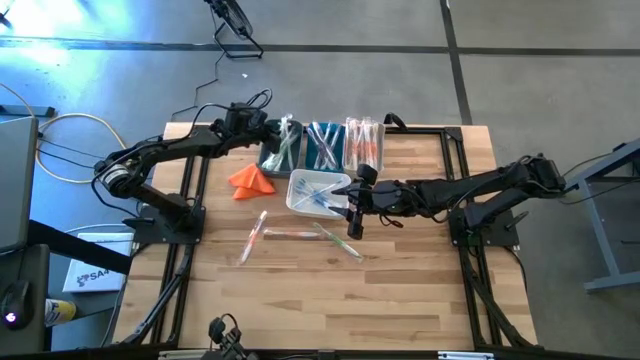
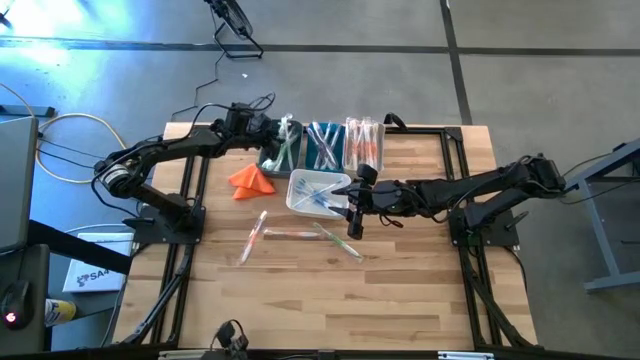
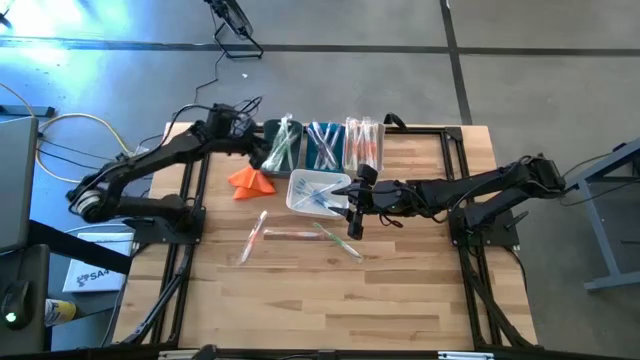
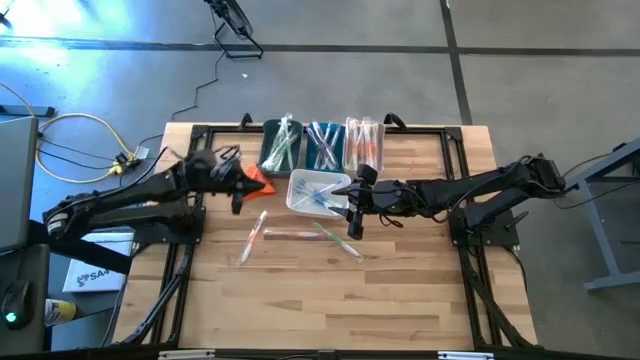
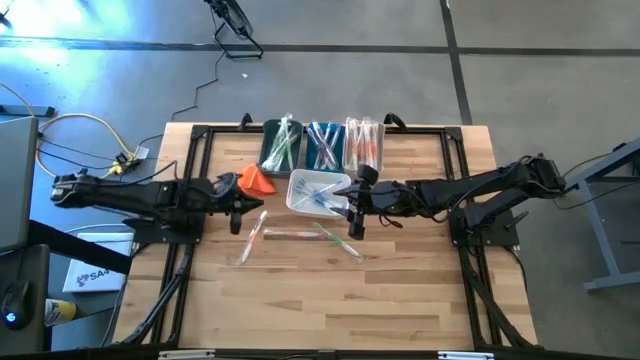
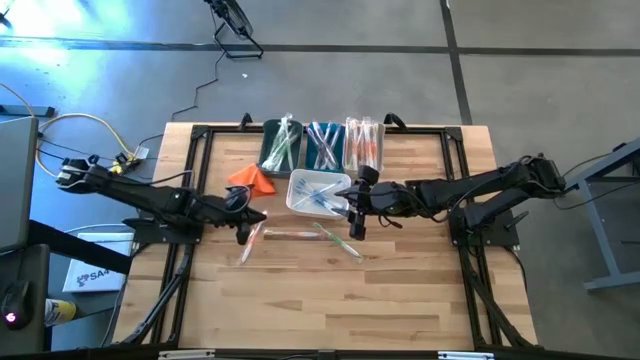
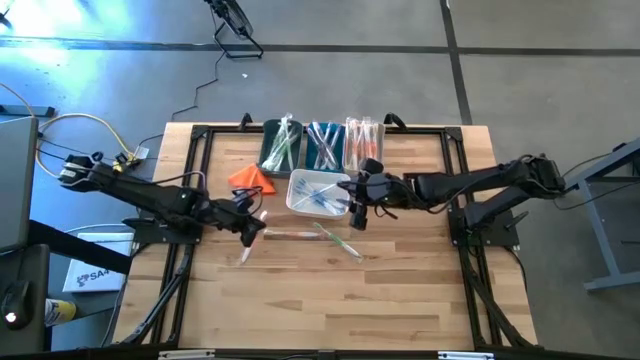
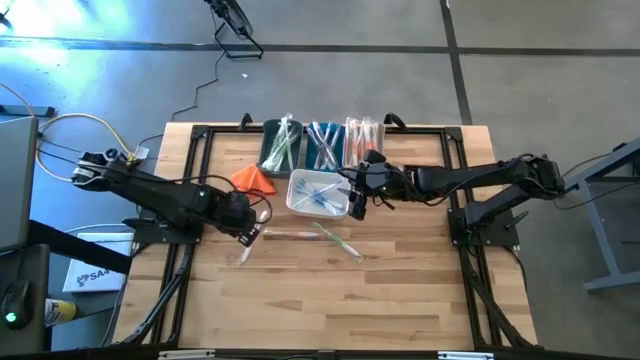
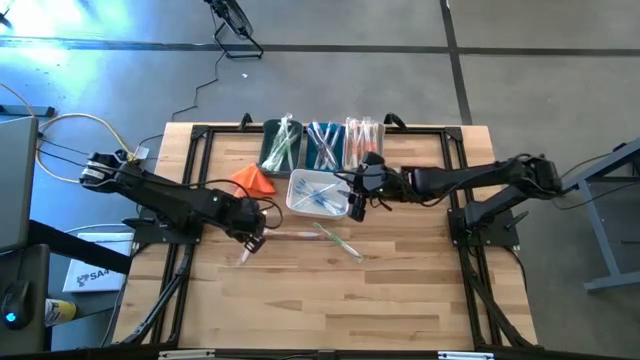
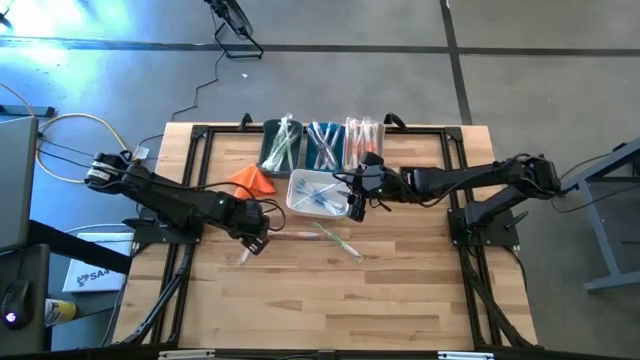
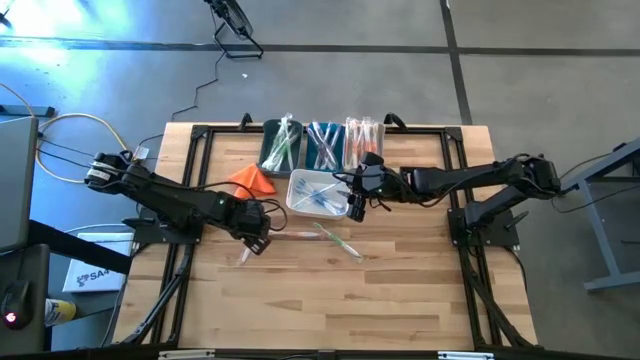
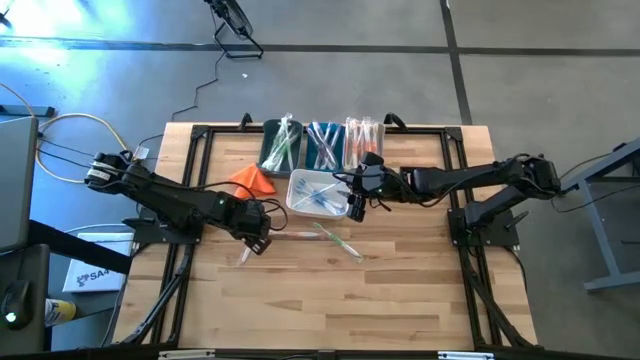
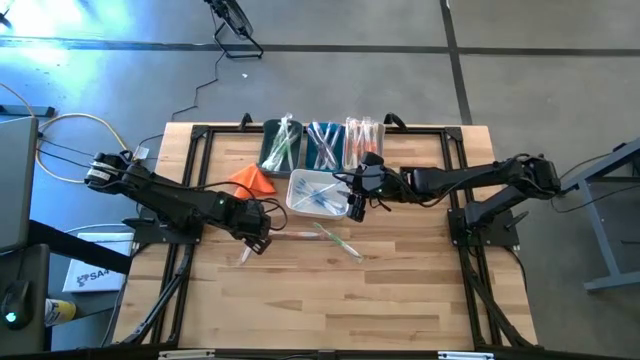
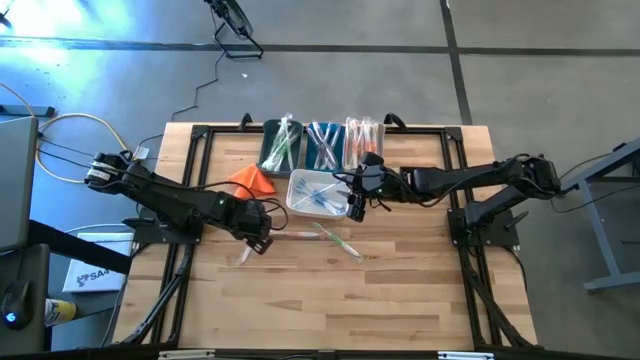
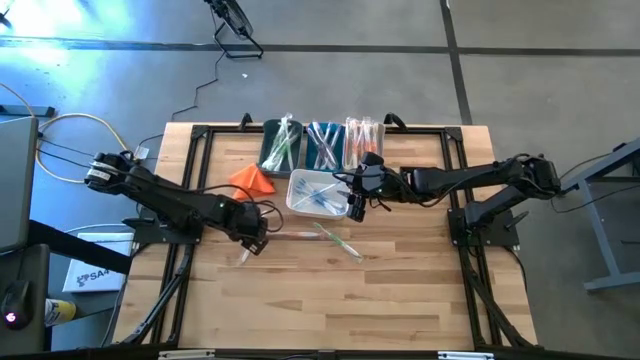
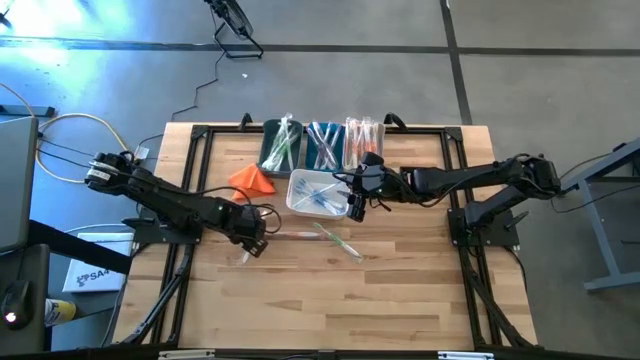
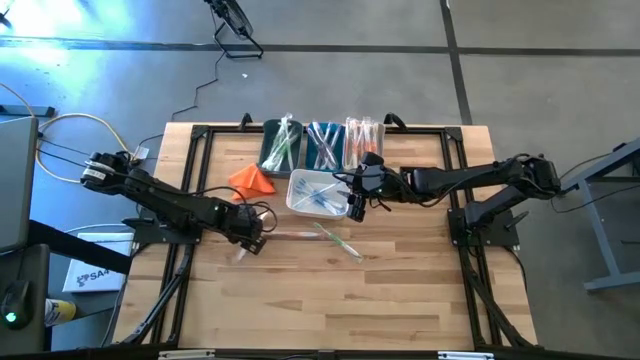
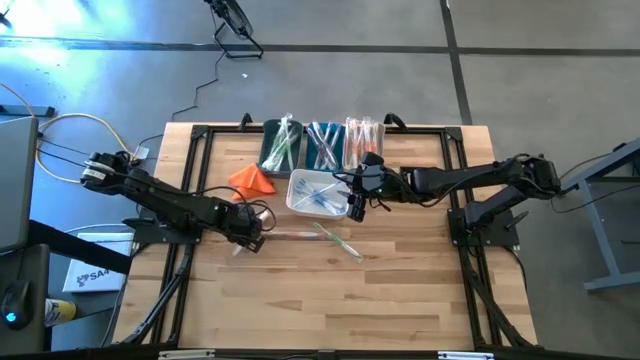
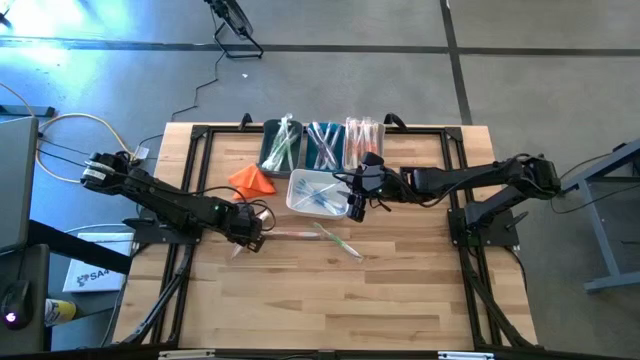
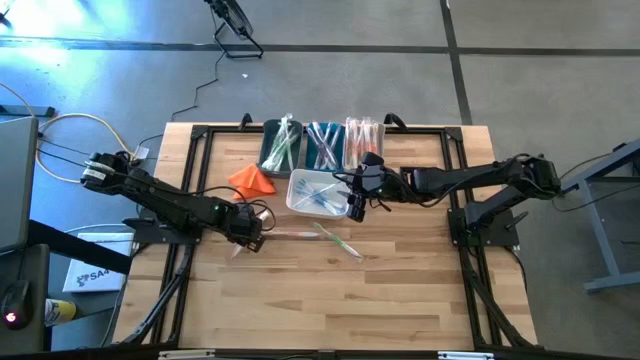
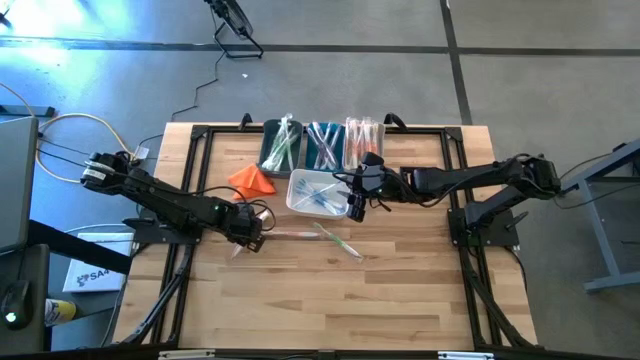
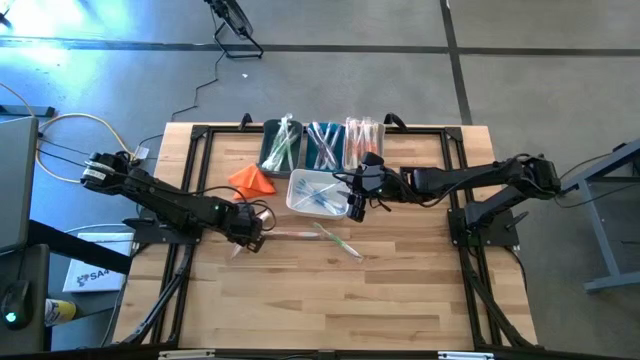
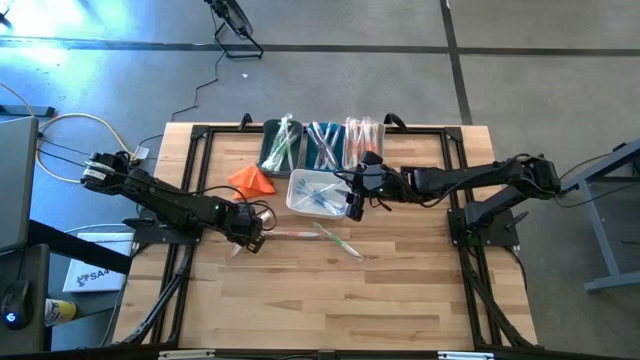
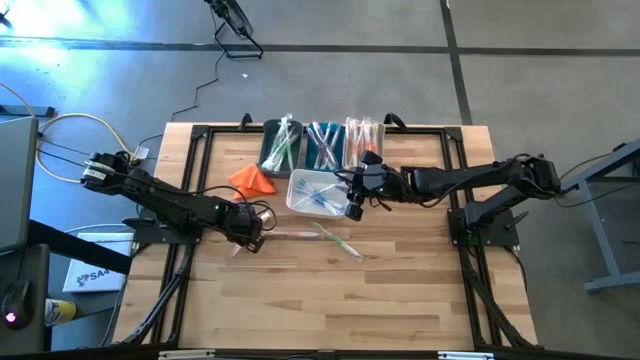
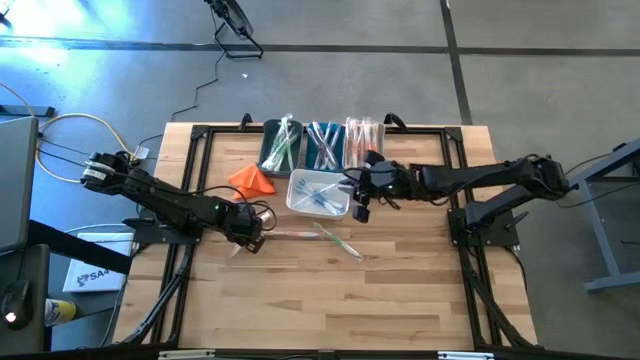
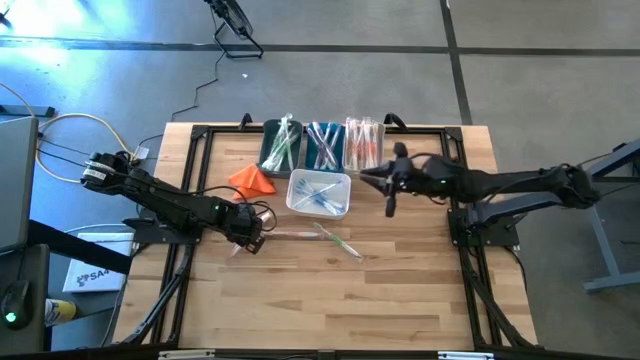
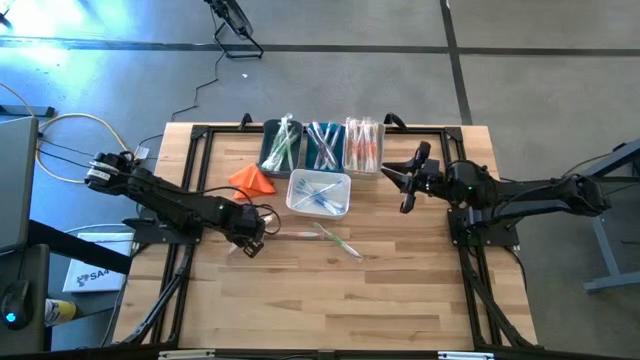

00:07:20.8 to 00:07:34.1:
Task: Pick & Place Toothbrushes
Put the orange toothbrush into the gray bin

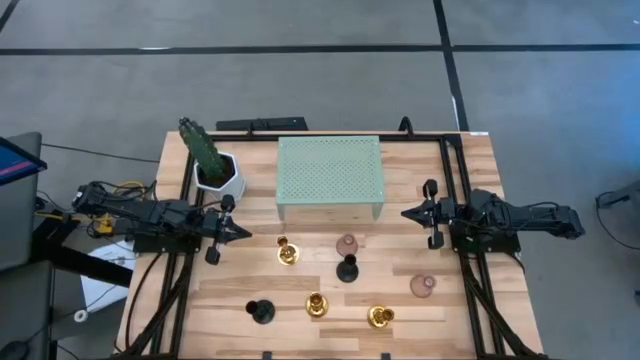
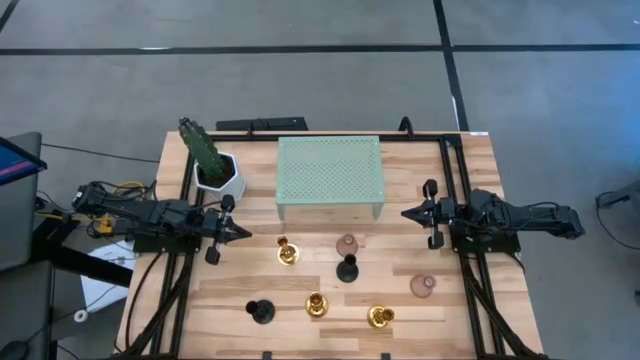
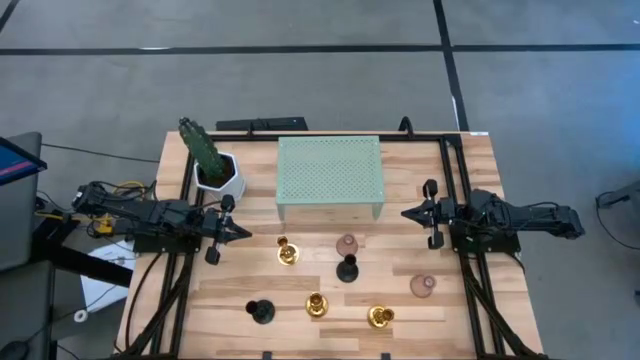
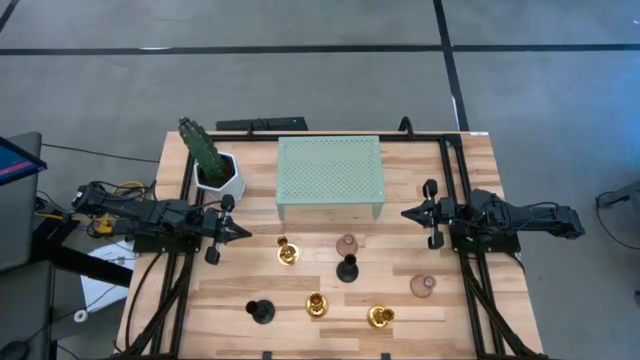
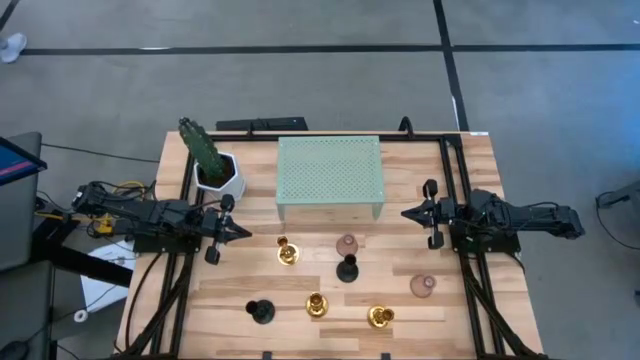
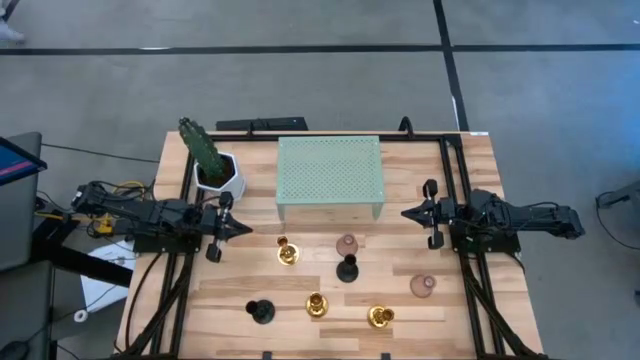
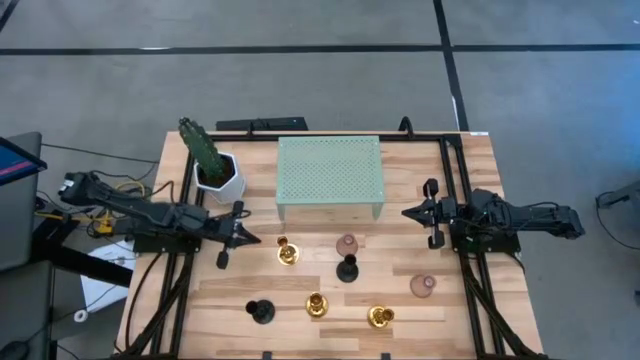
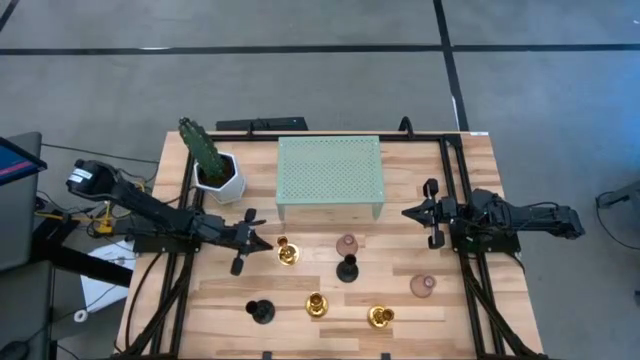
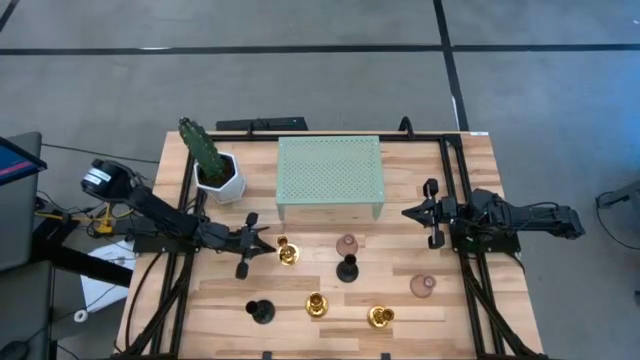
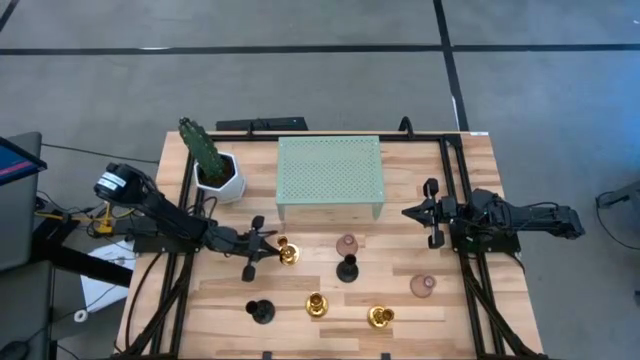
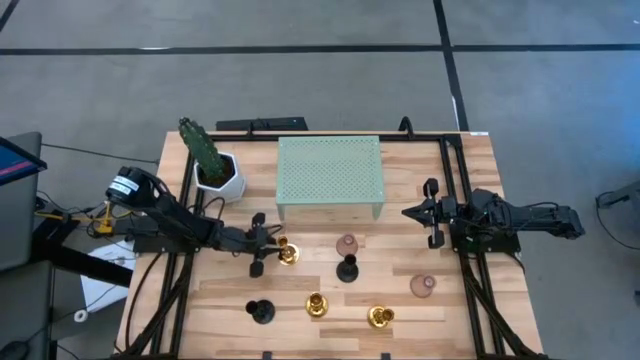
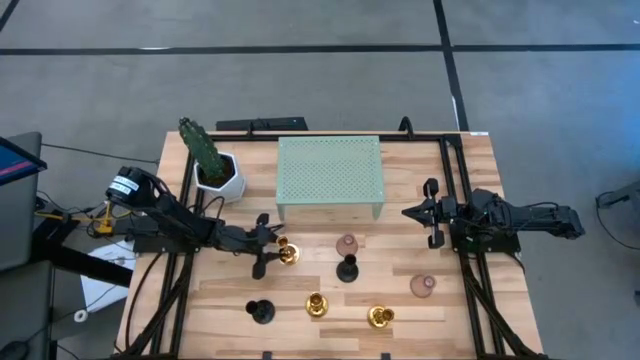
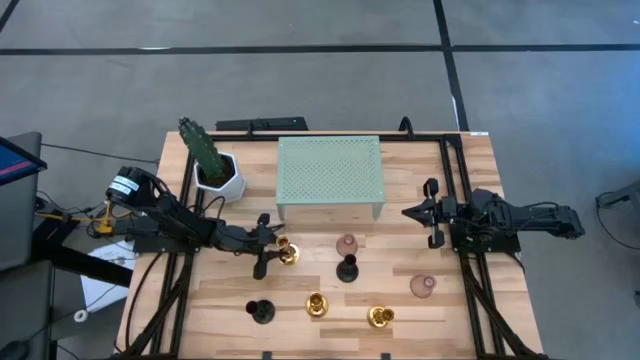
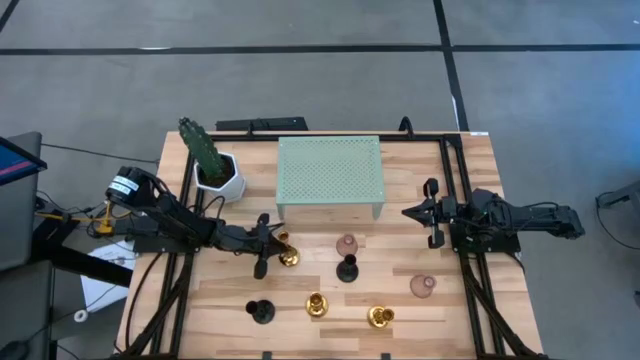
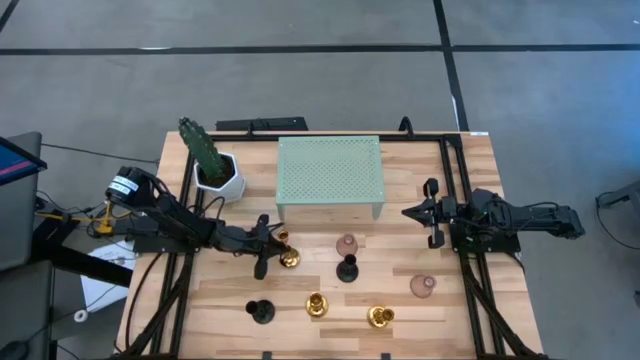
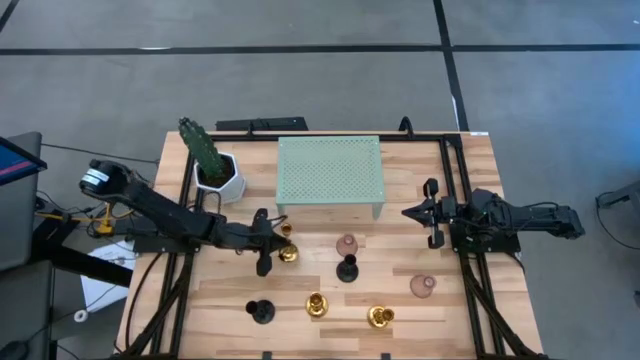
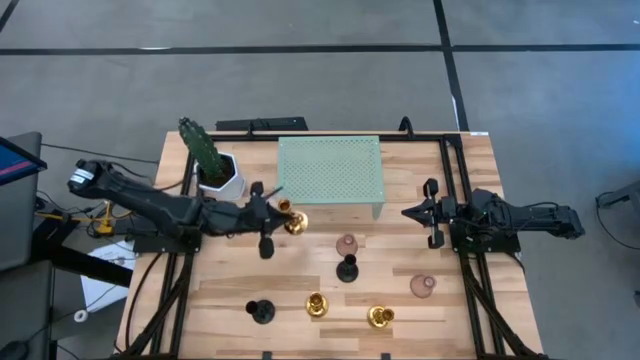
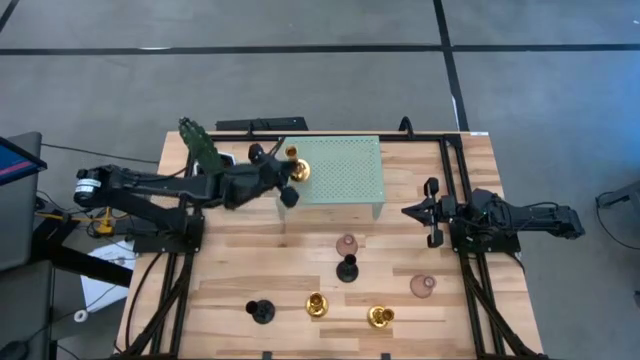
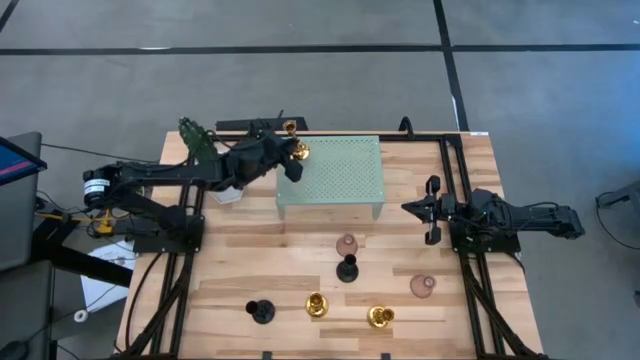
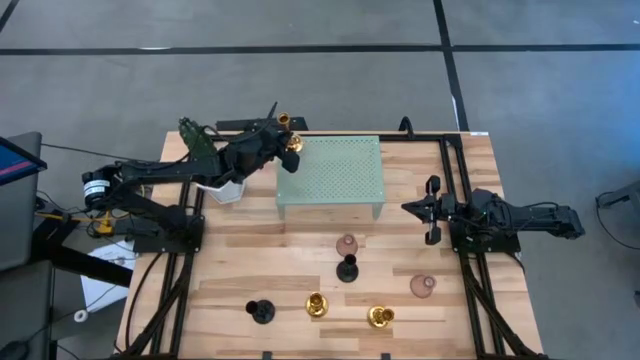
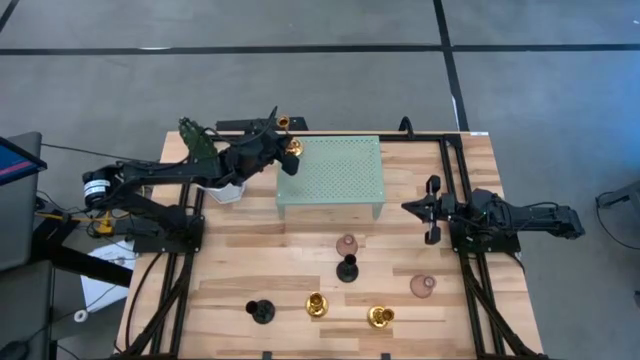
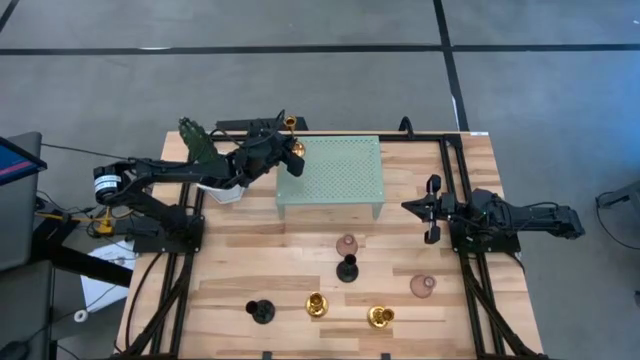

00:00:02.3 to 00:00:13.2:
Task: Pick & Place candle stick holders
Put the top gold candle holder on the shelf
